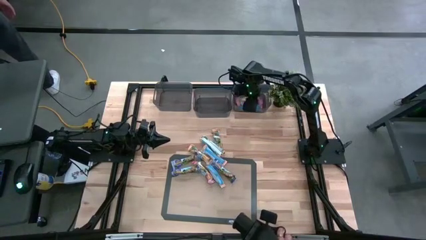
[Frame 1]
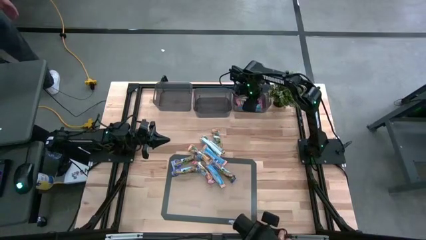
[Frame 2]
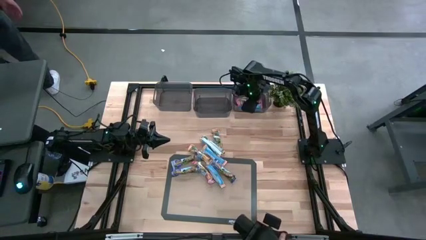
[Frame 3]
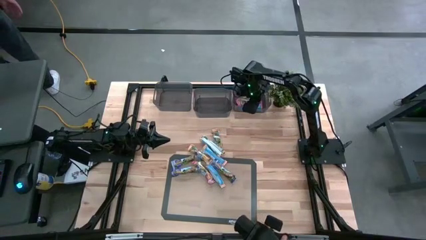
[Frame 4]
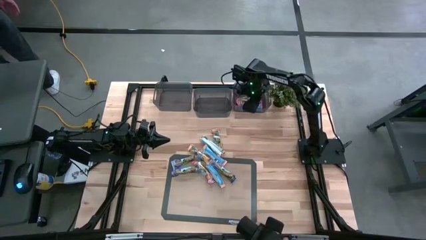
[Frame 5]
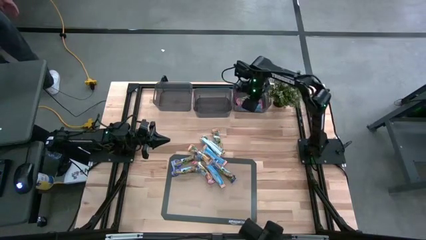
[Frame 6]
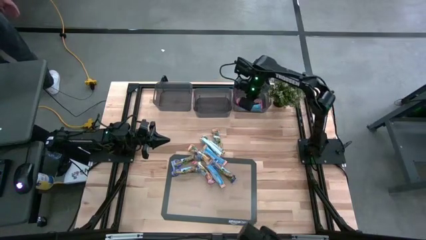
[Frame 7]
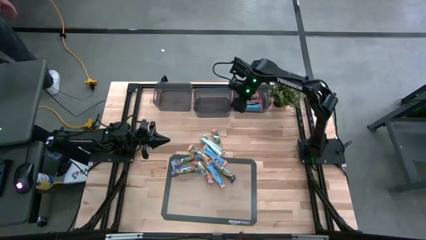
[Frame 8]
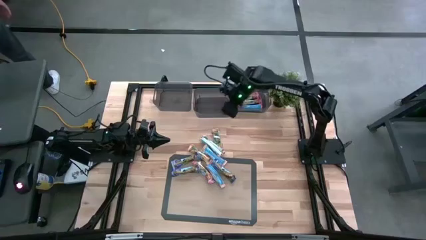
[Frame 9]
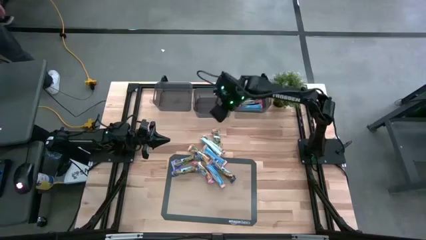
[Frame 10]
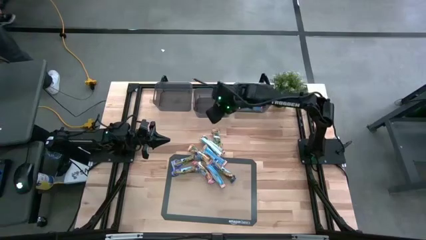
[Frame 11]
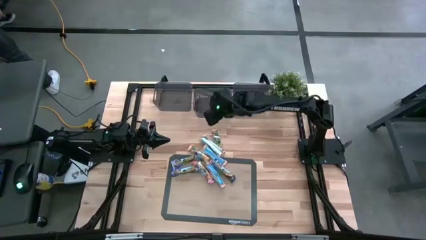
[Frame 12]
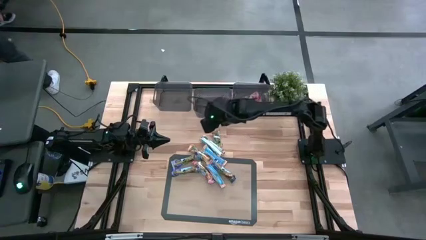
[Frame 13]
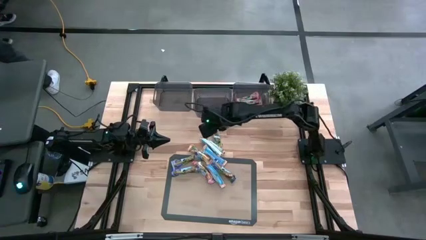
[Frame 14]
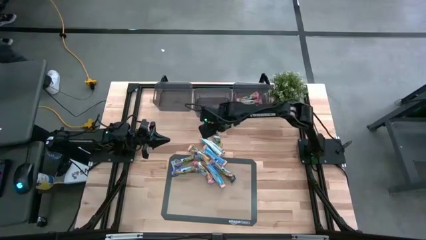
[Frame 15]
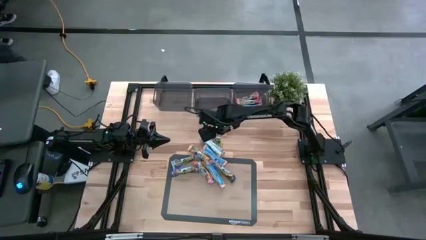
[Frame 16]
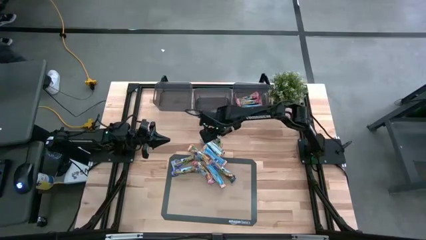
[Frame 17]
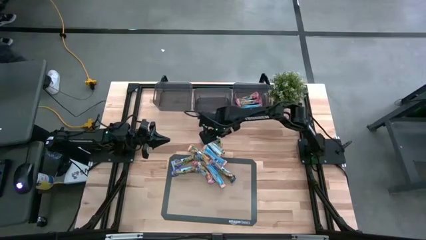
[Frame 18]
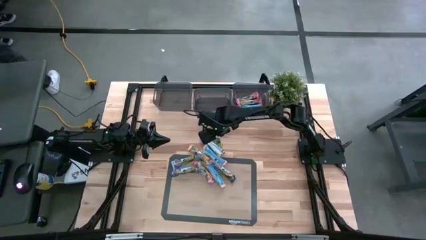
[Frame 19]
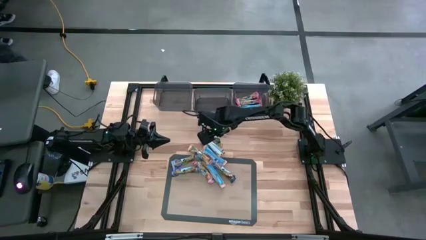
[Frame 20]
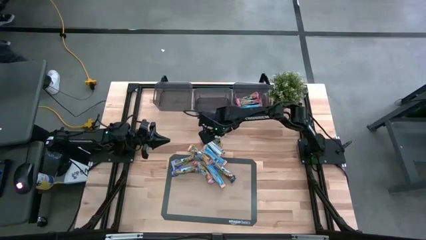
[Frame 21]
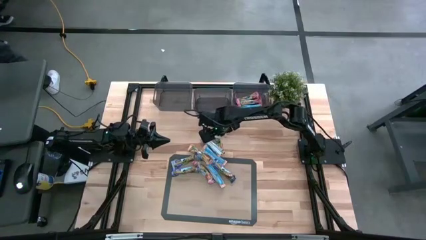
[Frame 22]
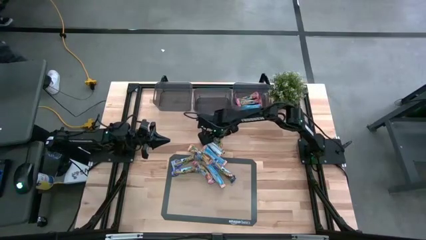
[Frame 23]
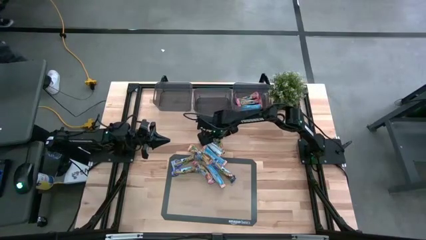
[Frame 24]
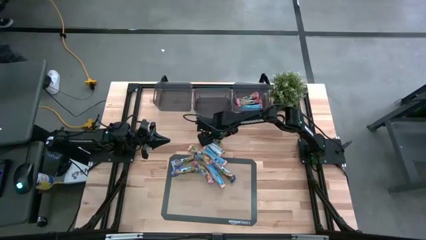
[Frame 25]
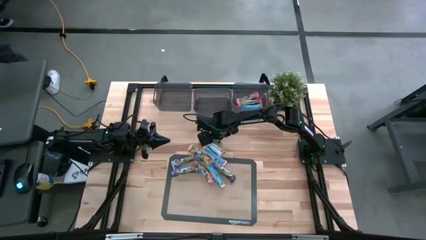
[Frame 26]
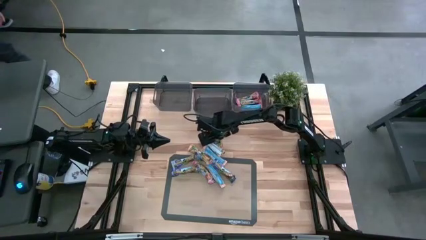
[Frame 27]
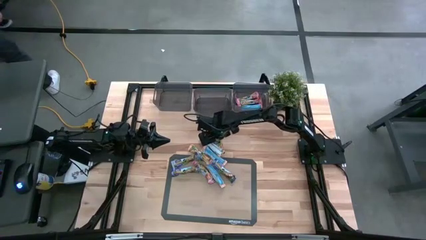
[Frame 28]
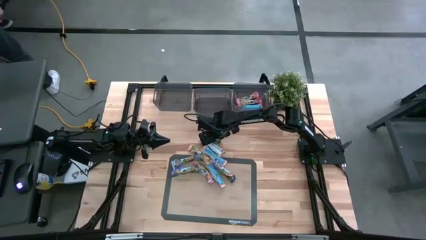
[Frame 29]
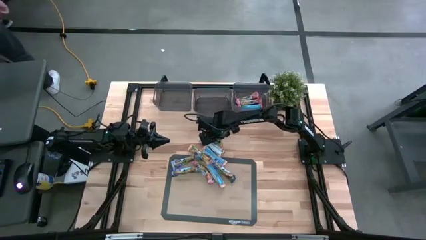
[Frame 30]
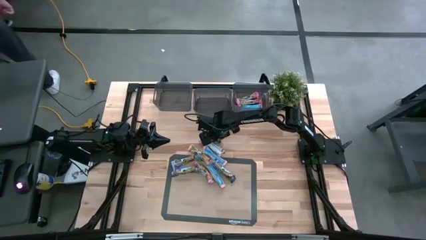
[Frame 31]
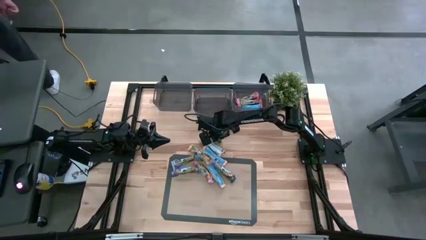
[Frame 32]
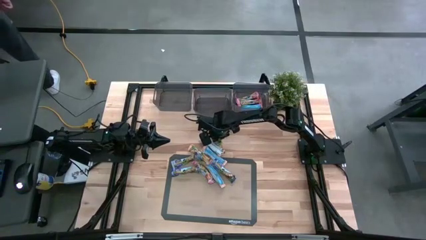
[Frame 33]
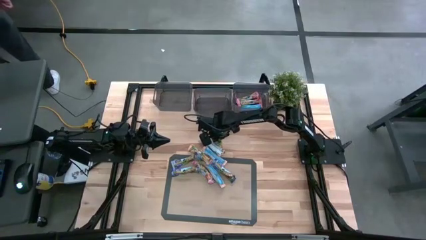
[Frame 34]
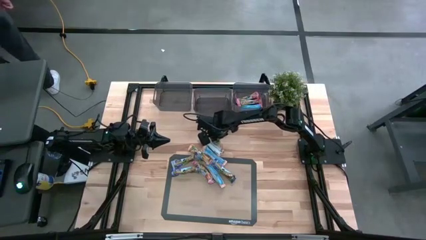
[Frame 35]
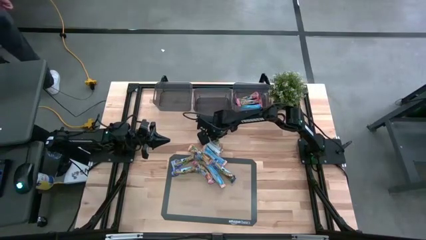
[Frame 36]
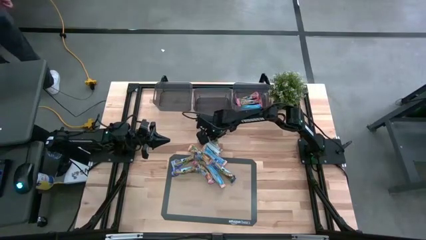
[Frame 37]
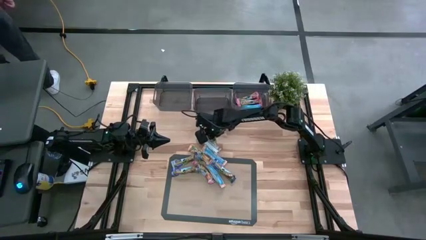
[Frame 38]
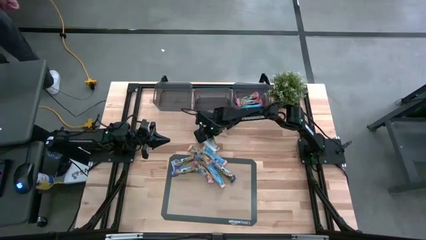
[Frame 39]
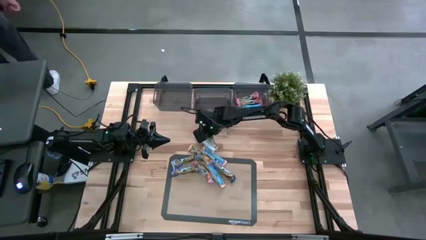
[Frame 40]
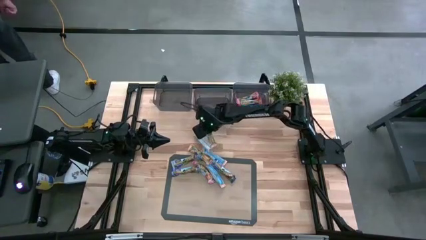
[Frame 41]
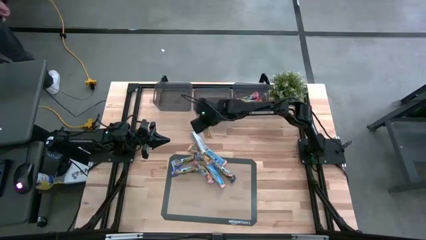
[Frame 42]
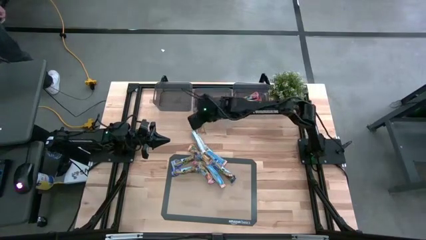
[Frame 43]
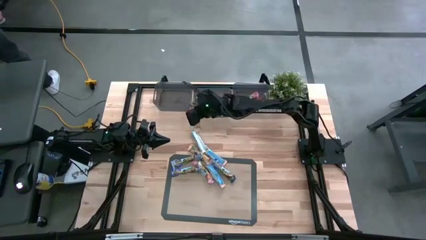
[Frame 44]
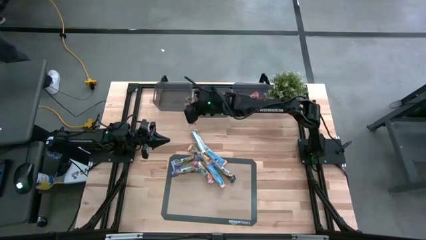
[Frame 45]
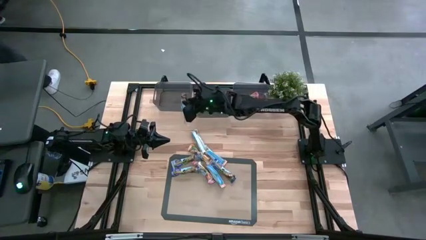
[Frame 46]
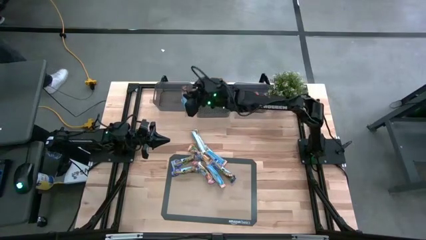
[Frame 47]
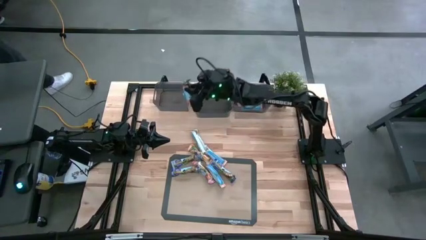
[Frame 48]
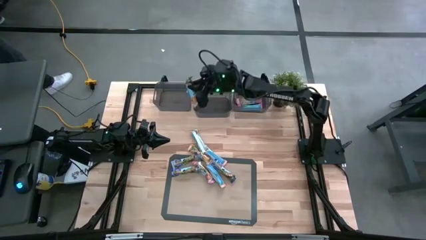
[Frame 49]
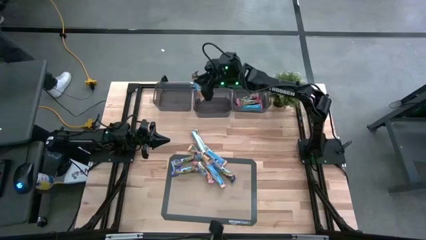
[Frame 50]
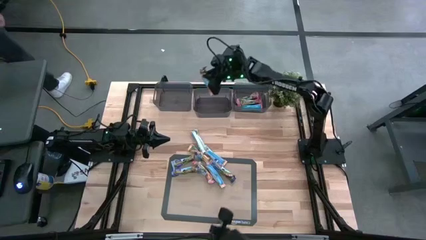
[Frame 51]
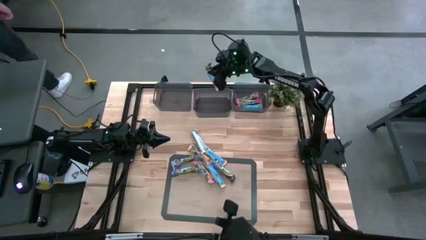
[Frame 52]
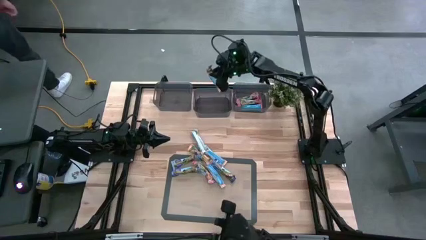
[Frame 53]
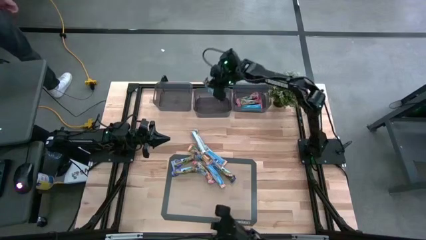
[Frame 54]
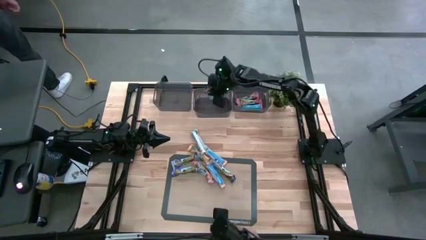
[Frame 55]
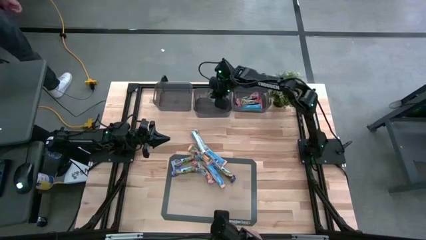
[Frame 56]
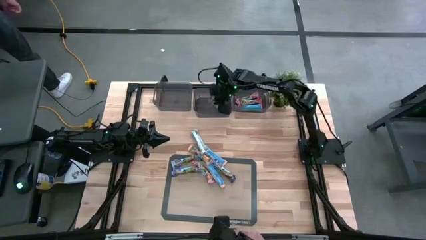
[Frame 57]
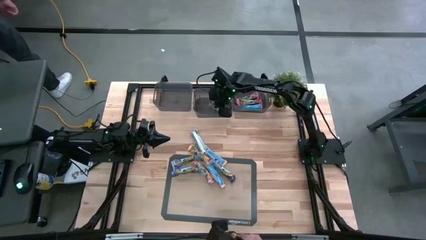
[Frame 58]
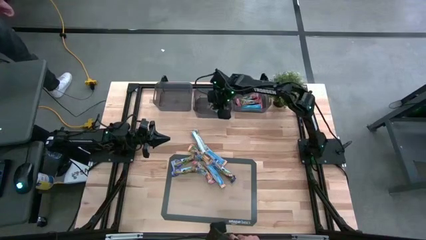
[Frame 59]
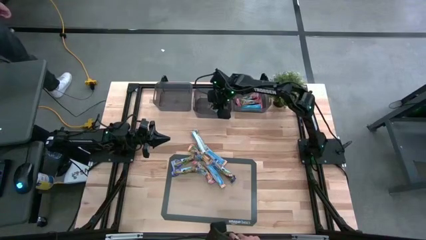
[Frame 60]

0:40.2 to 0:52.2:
Task: Pick and place Granola Bars by type
Put the yellow granola bar into the center black bin

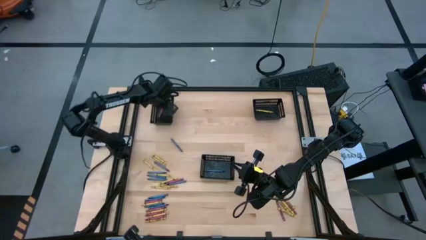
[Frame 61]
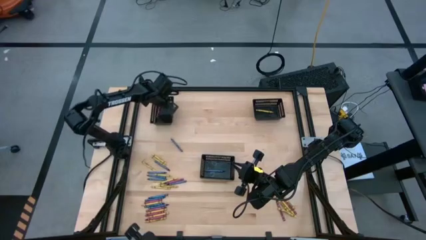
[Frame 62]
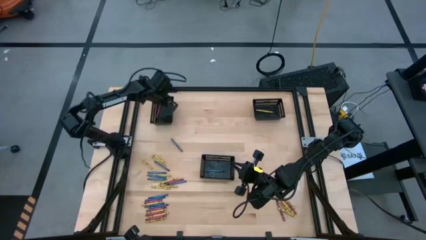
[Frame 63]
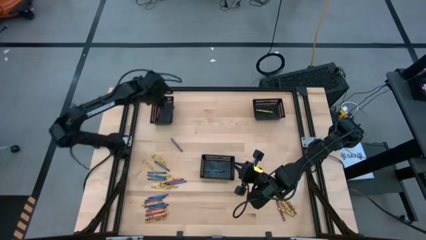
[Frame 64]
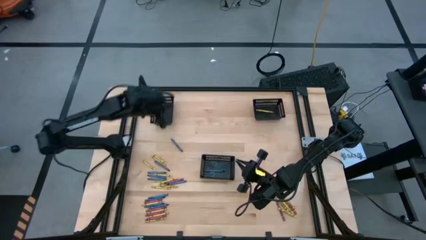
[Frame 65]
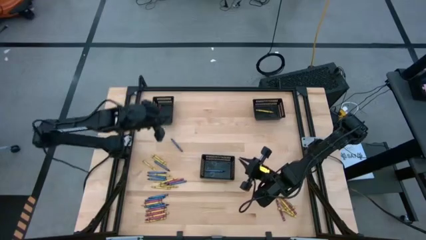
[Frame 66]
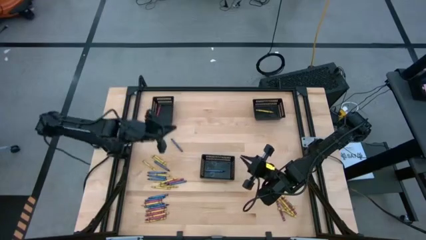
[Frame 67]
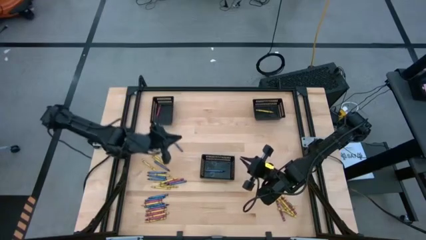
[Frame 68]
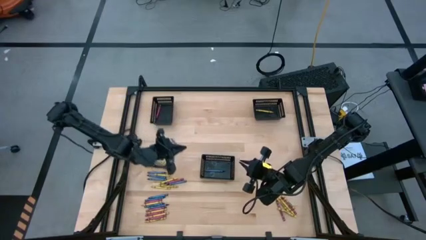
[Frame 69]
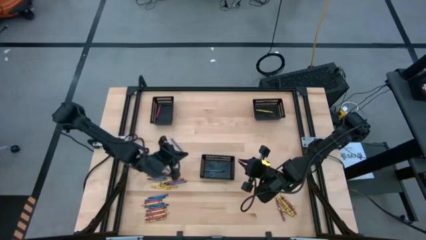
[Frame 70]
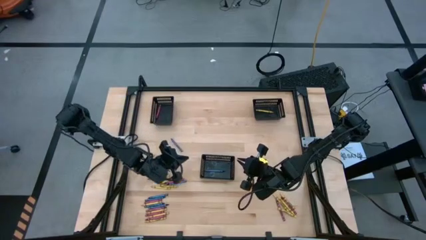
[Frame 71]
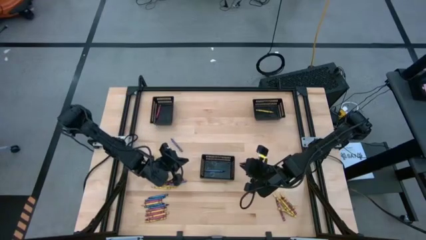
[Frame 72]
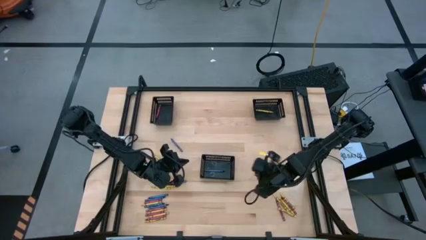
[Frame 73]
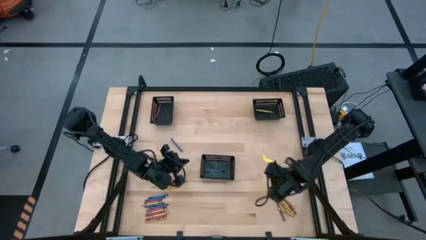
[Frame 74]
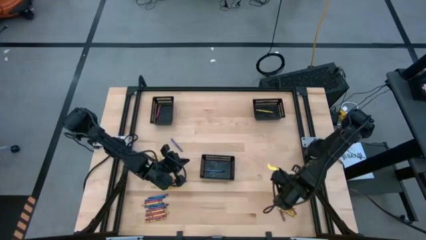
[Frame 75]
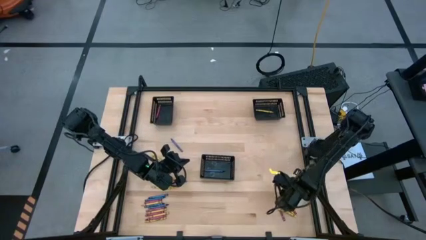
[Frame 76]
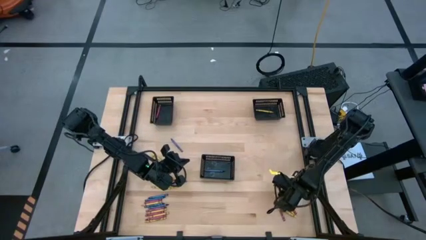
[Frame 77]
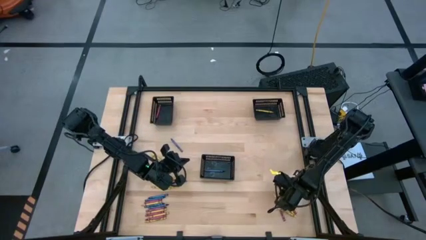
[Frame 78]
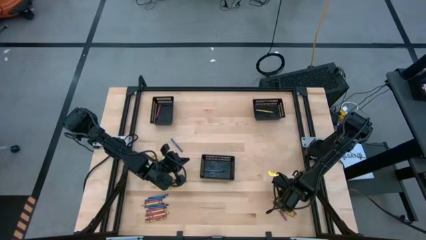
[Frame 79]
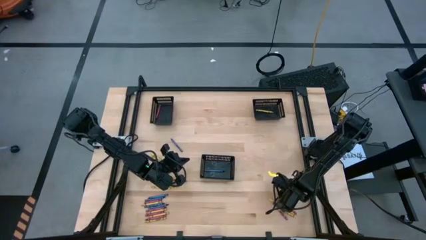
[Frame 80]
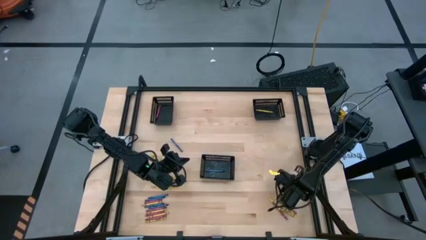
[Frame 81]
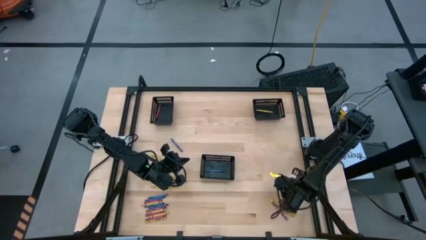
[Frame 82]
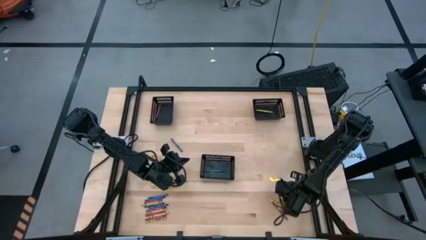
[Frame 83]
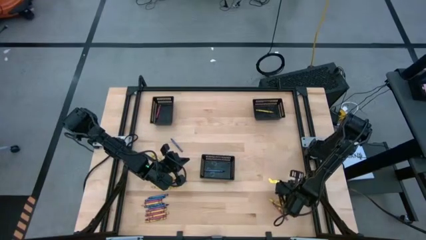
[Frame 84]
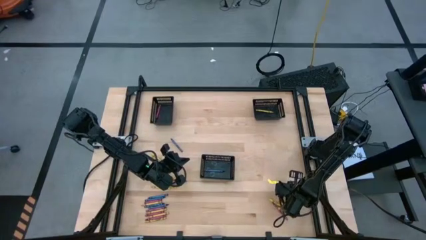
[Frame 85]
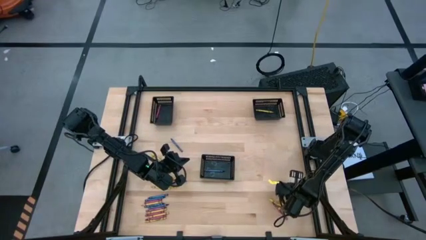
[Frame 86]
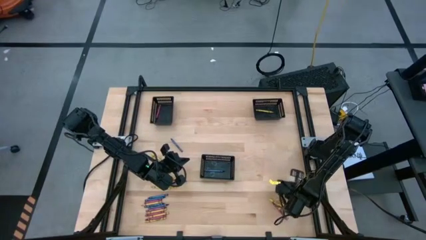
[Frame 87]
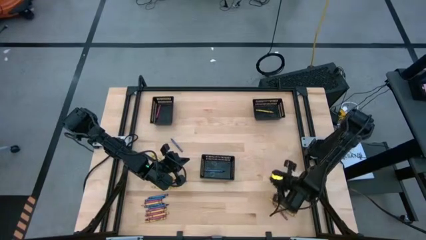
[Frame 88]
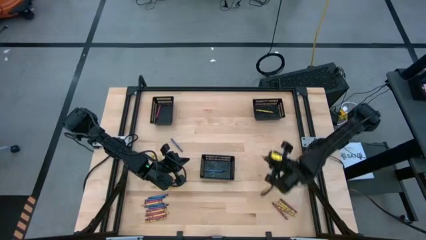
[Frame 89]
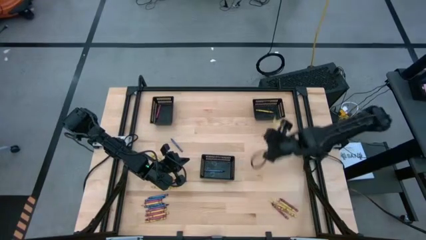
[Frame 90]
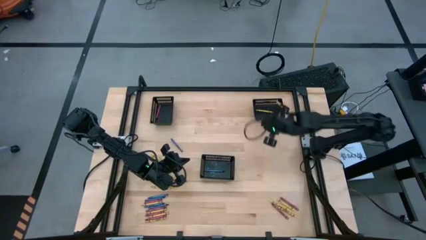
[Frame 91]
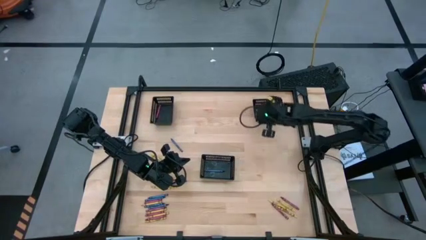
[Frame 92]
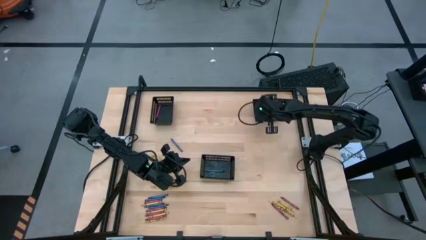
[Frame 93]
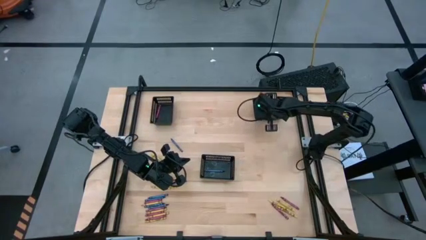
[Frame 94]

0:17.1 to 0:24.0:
Task: Sort crayons
Put the yellow crayon into the top right black bin
